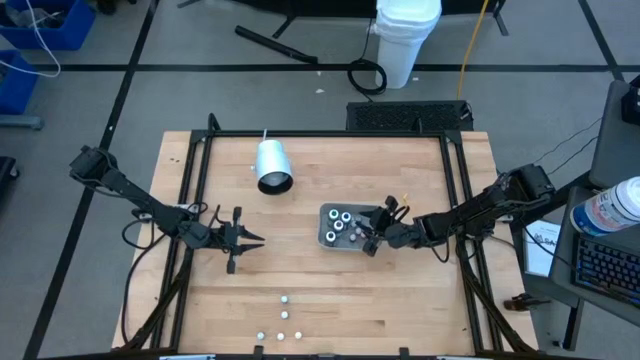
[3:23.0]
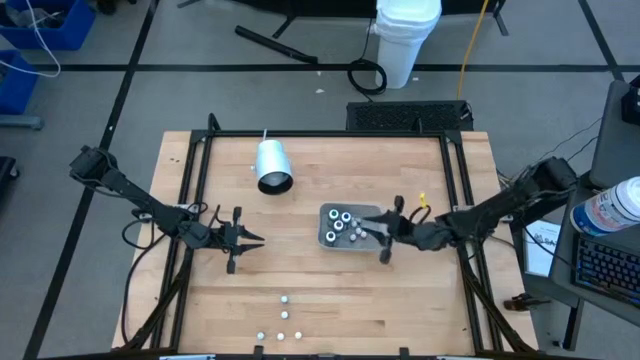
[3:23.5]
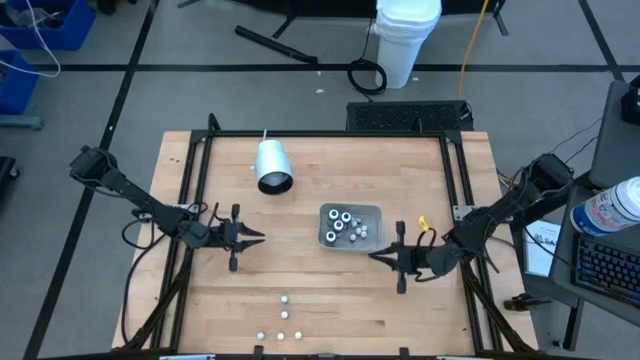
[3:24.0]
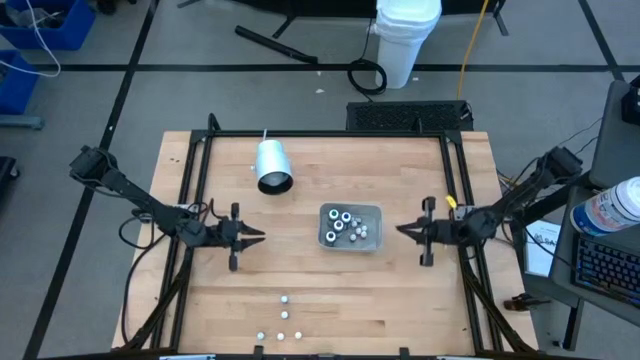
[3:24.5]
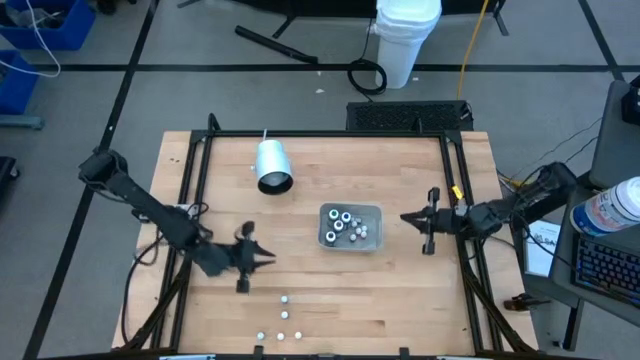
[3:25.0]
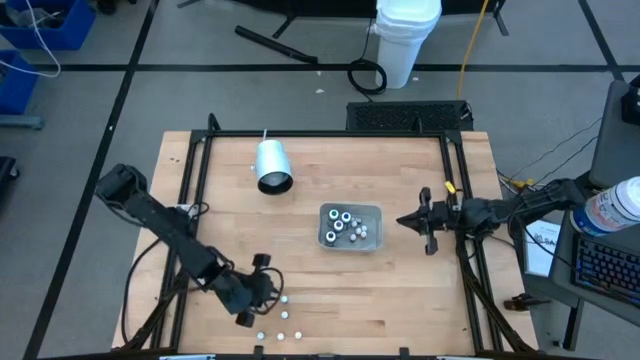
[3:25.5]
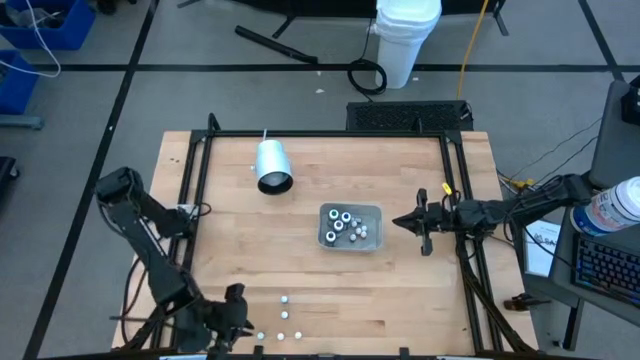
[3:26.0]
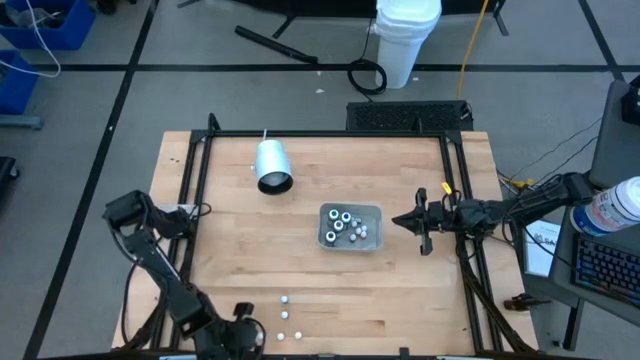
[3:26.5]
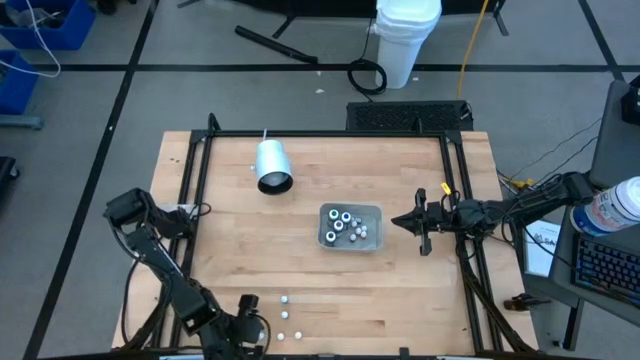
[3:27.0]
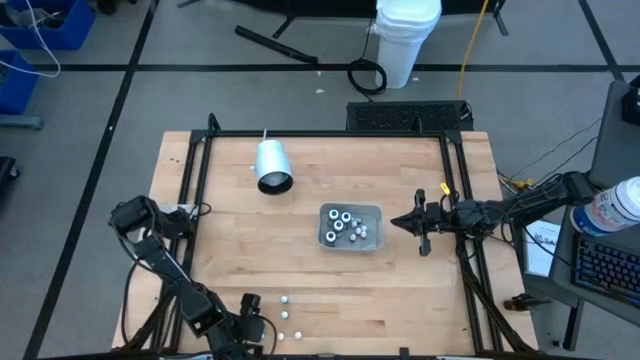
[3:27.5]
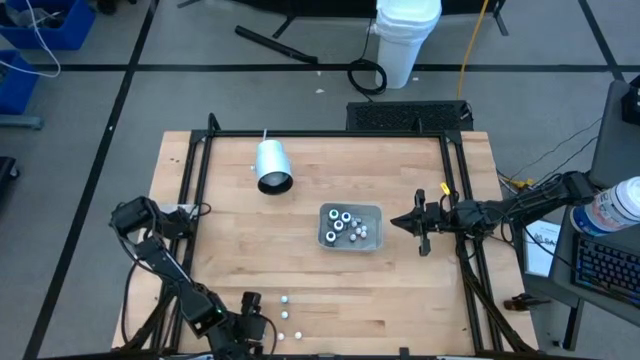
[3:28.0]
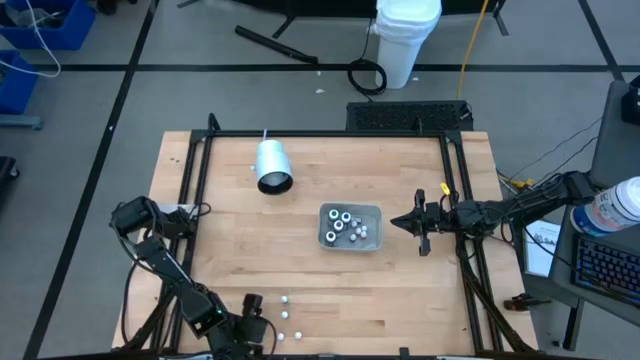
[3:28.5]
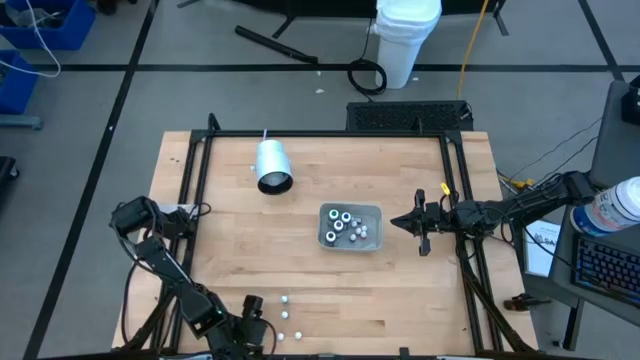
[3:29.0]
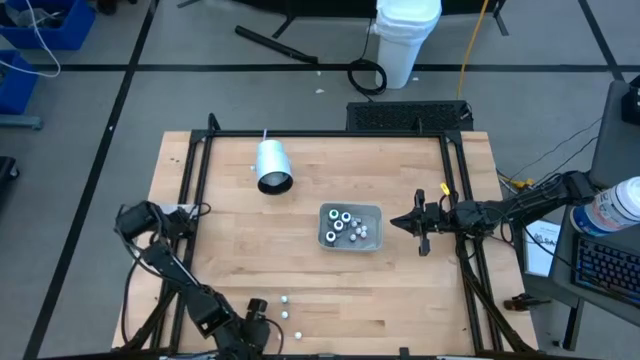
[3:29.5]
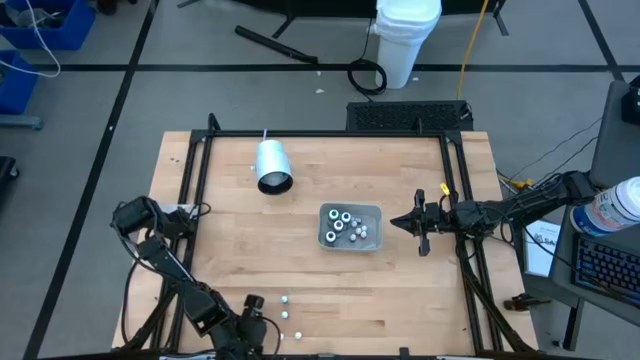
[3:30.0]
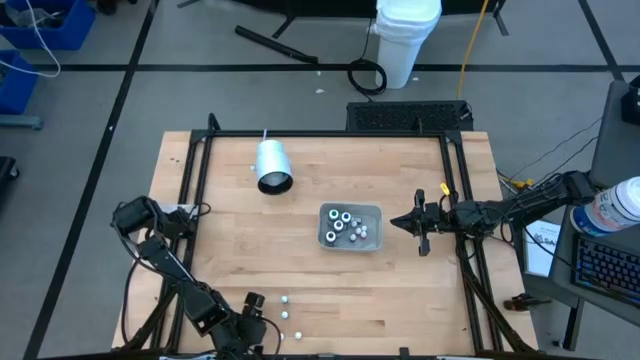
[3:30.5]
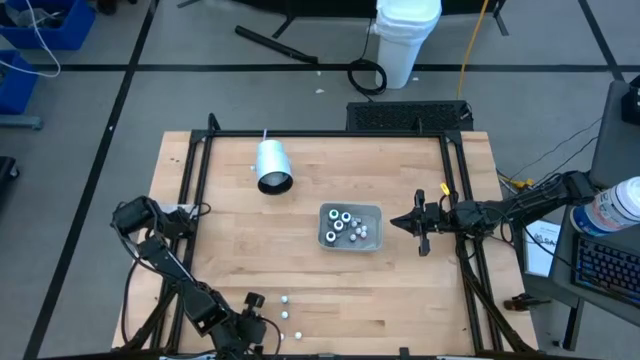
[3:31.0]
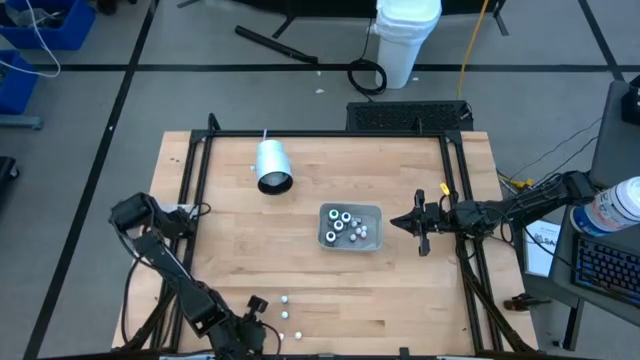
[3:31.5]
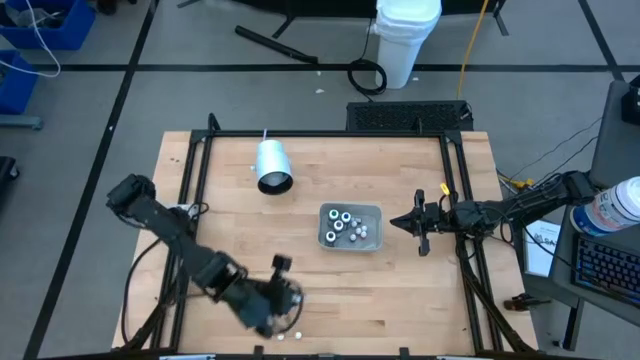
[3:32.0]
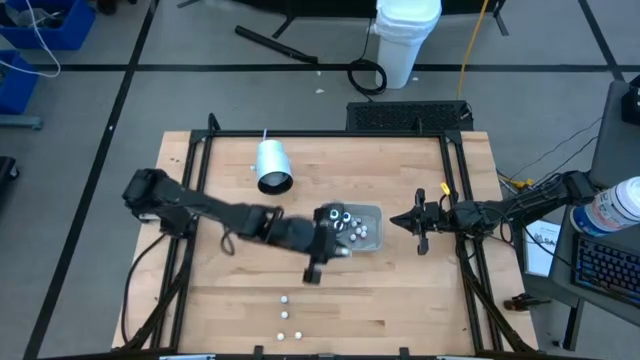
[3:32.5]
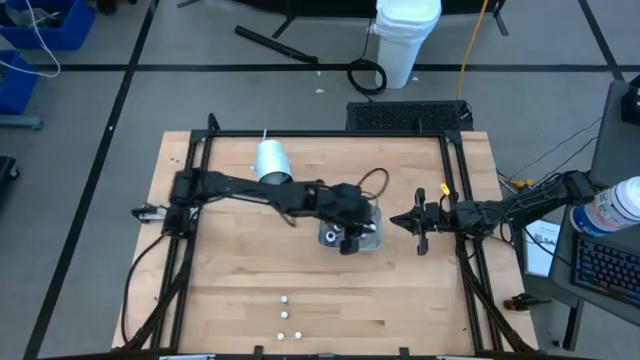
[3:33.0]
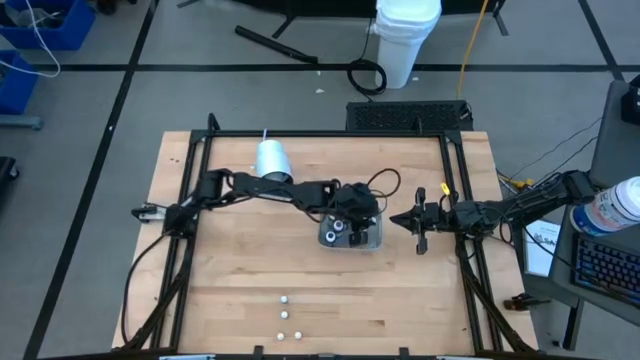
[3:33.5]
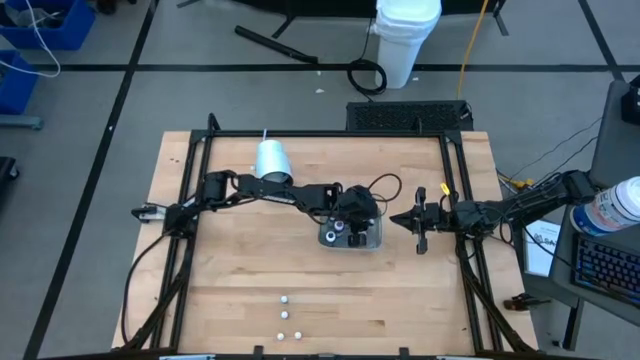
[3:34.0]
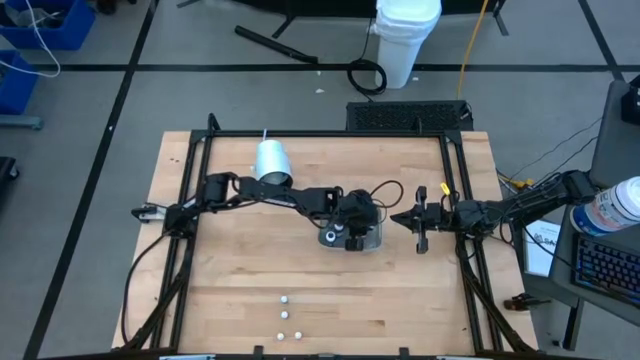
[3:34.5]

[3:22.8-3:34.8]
Task: Pick & Place food coloring
Put the small green food coloring bottle into the white bin

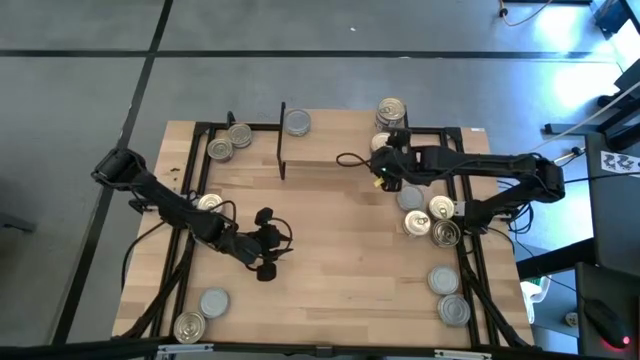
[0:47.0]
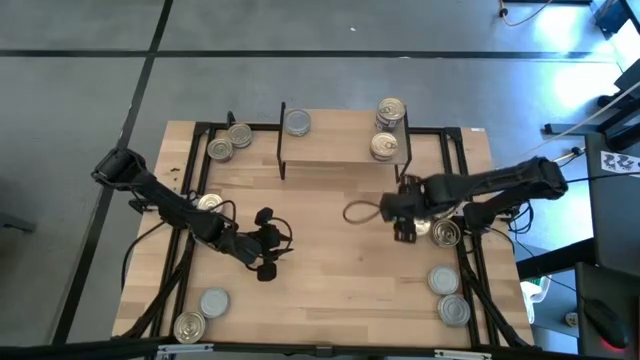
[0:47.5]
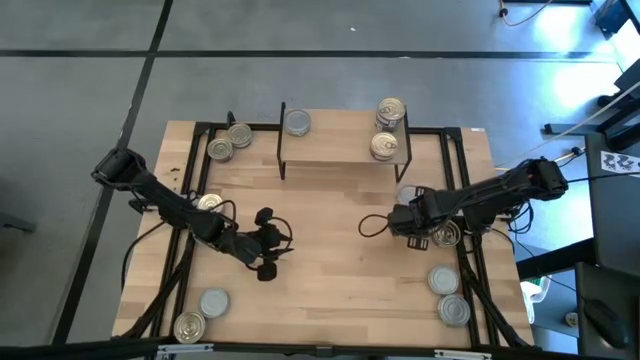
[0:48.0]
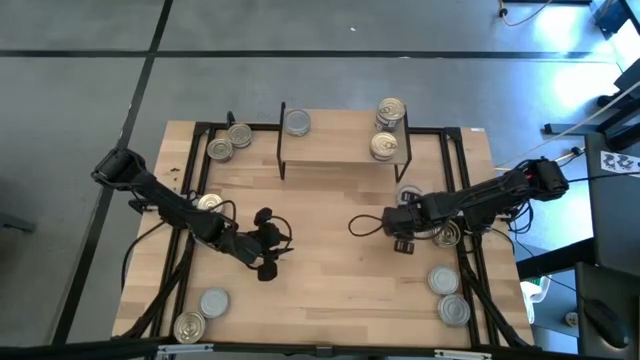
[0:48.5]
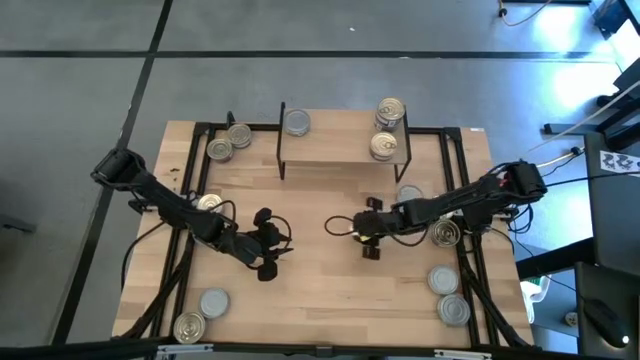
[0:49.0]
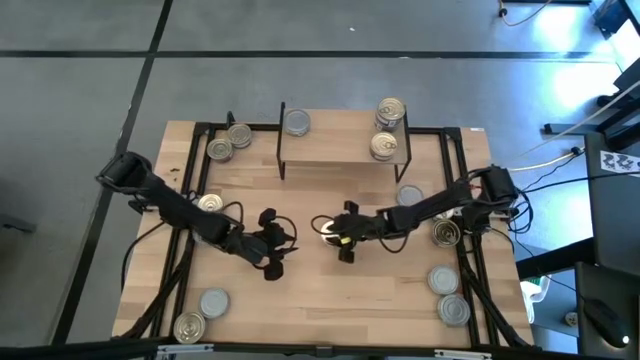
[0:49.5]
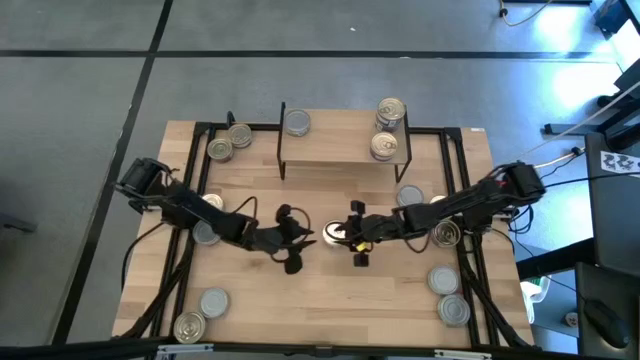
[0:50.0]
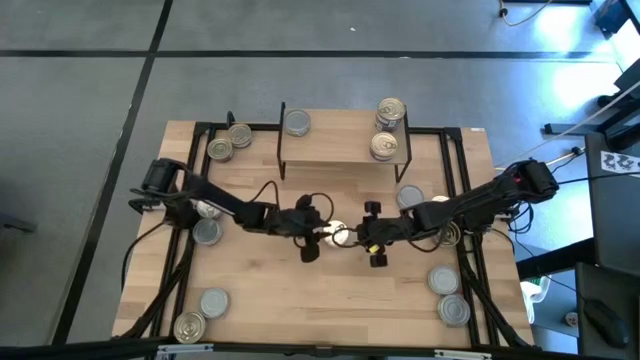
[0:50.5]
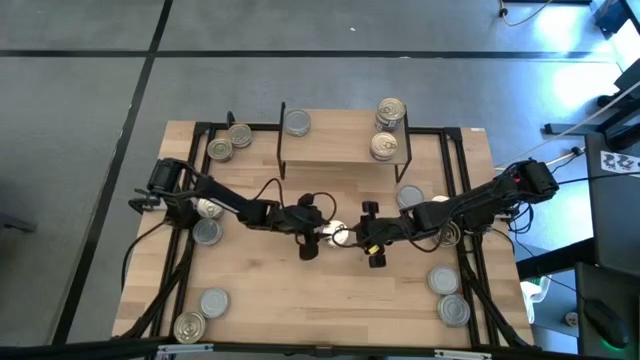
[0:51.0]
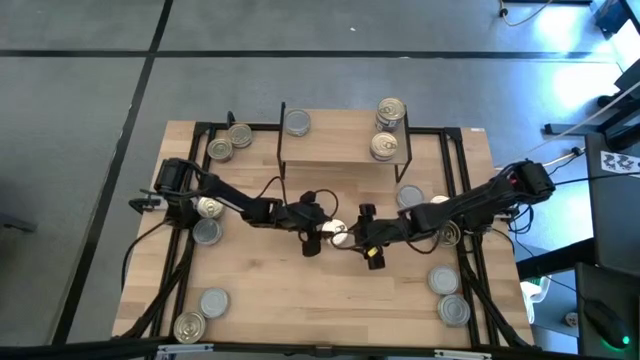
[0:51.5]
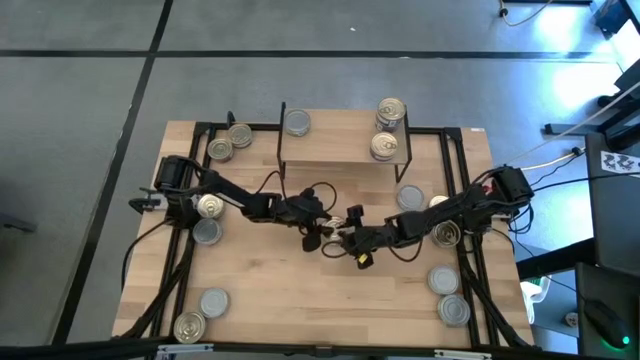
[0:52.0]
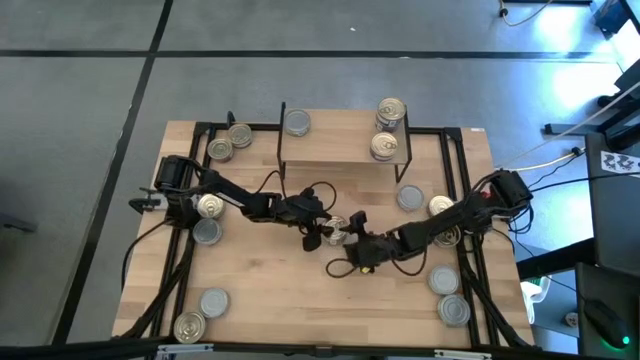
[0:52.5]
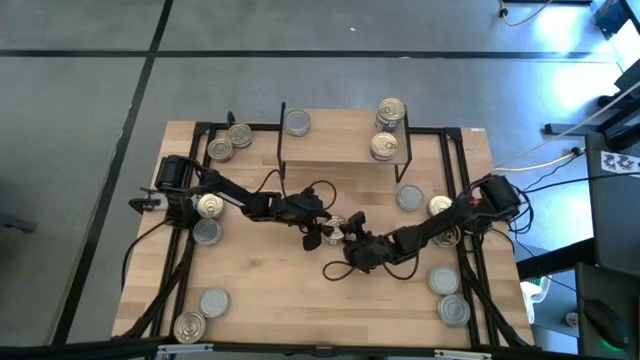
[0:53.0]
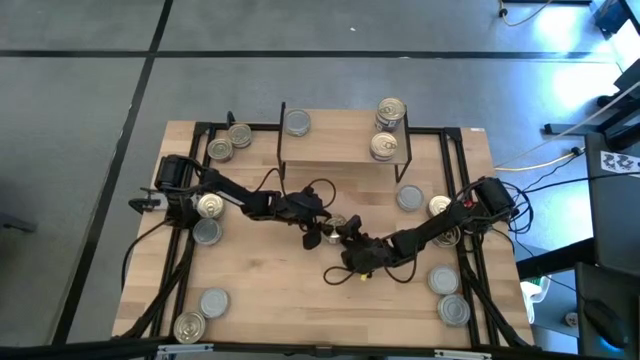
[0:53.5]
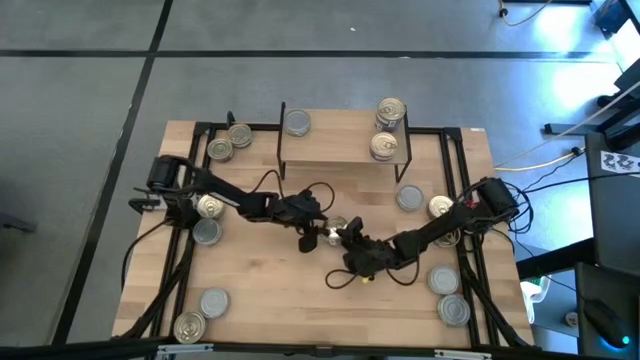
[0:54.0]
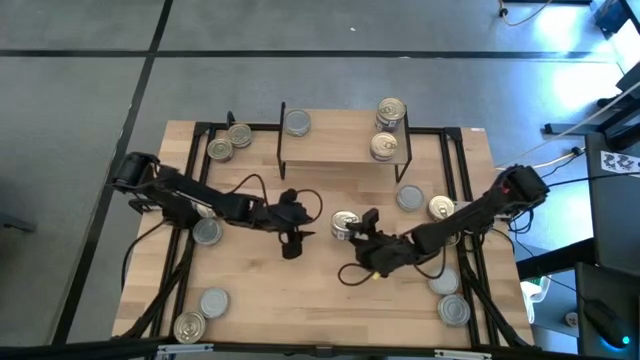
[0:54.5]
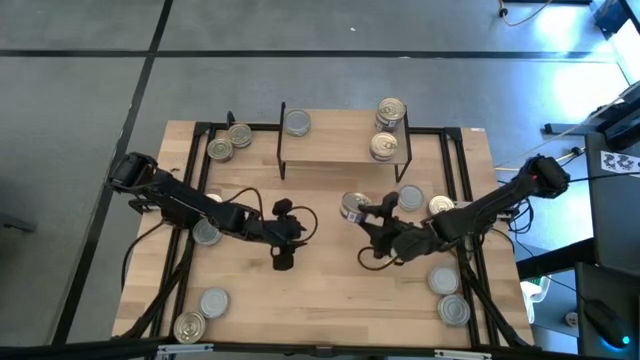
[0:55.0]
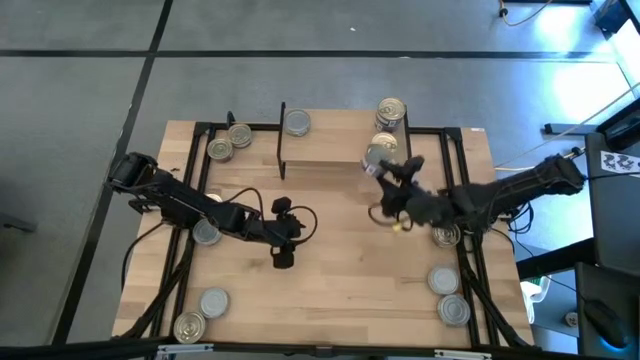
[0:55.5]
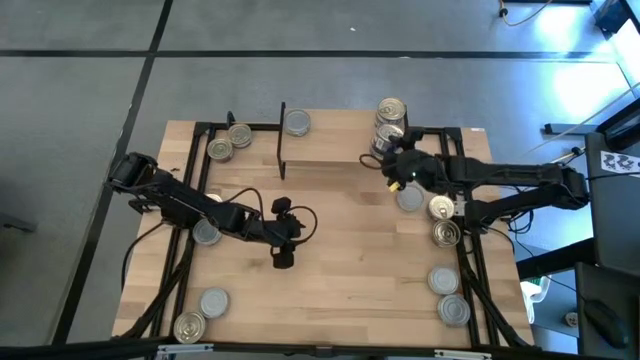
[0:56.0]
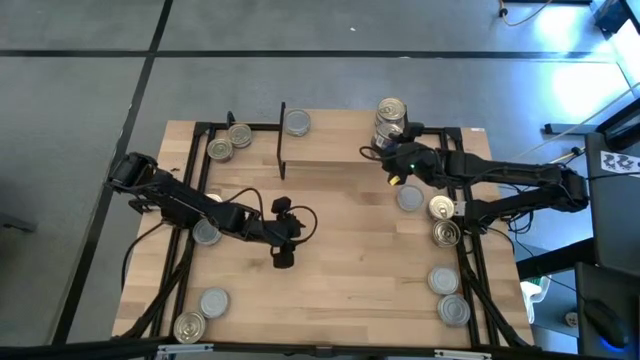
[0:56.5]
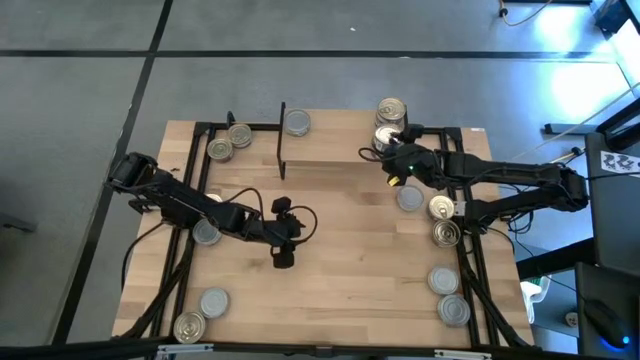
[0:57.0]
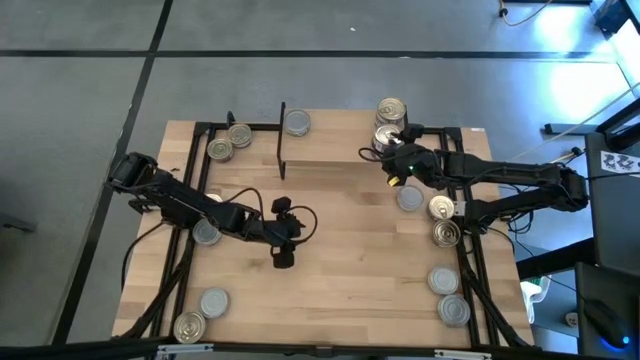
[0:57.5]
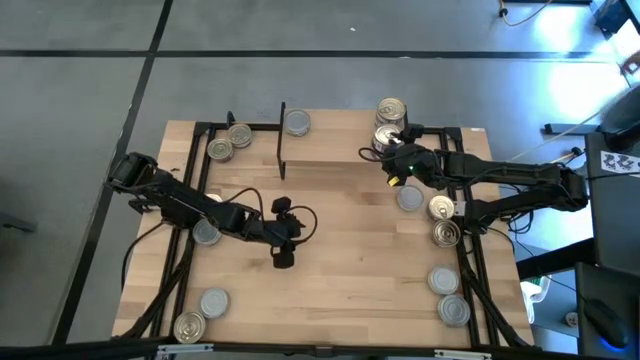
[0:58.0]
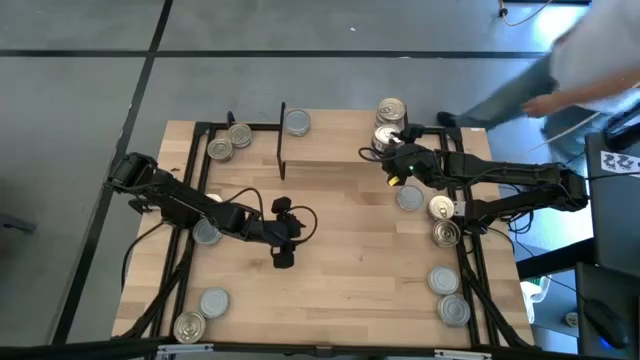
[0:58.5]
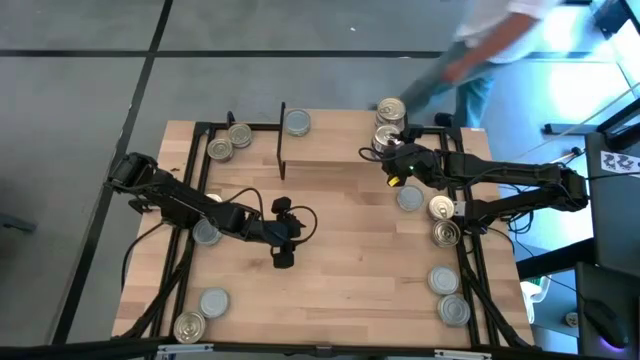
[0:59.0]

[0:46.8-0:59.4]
Task: Stack canned seafood by type on shelf
Stack the blue pink tuna can on top of the other blue pink tuna can on the shelf
